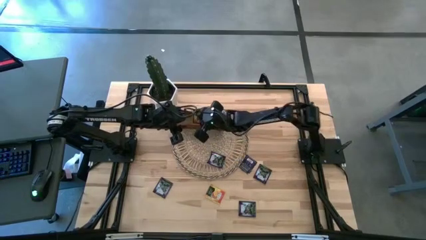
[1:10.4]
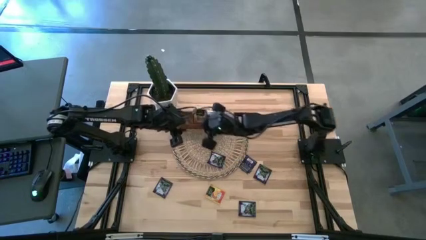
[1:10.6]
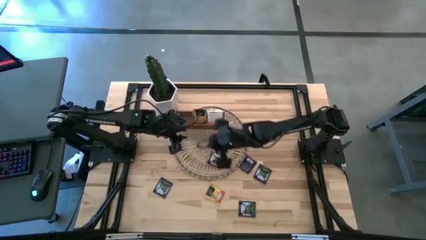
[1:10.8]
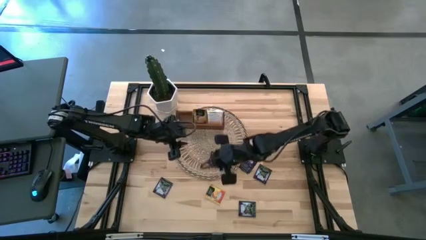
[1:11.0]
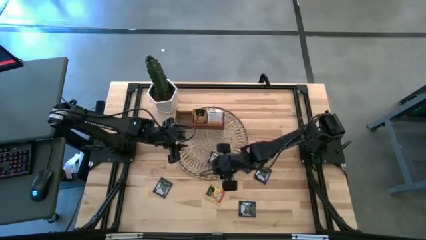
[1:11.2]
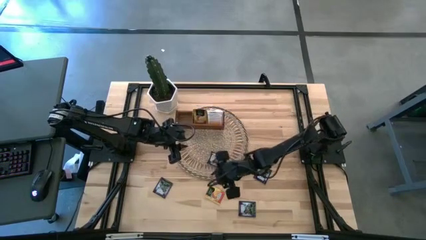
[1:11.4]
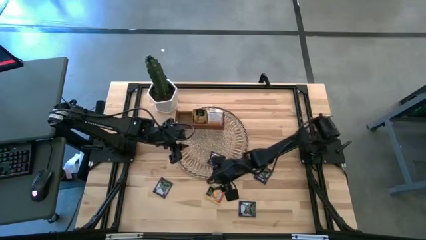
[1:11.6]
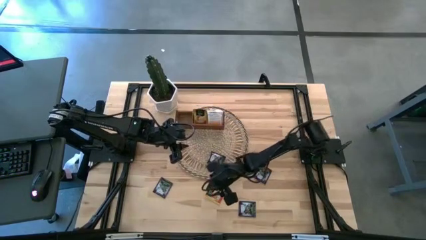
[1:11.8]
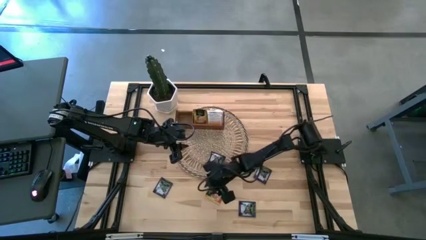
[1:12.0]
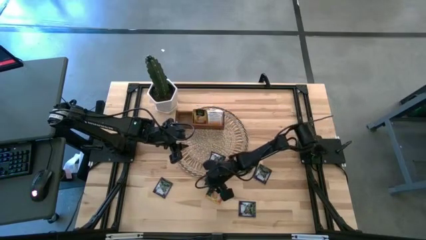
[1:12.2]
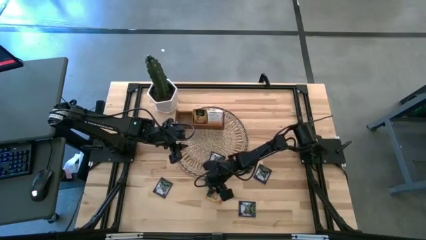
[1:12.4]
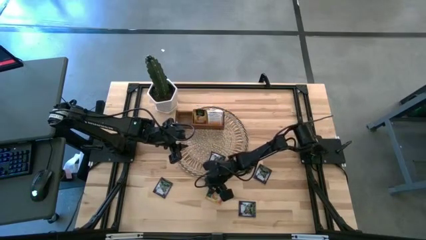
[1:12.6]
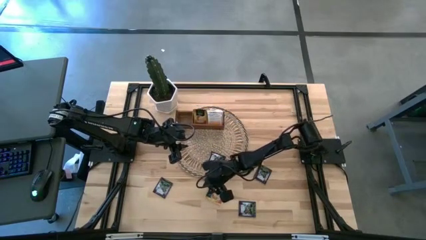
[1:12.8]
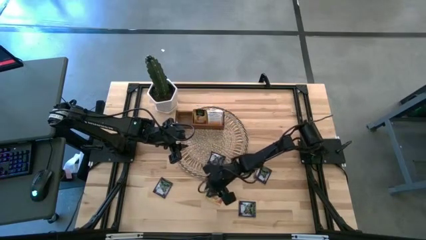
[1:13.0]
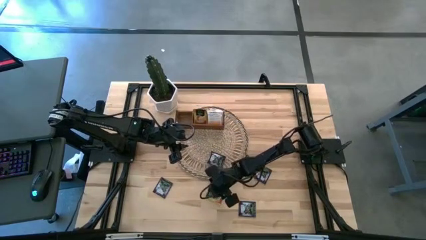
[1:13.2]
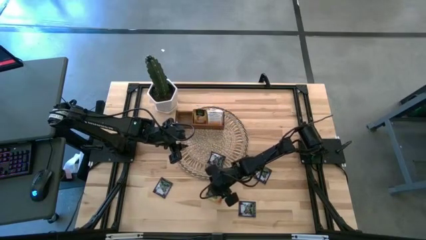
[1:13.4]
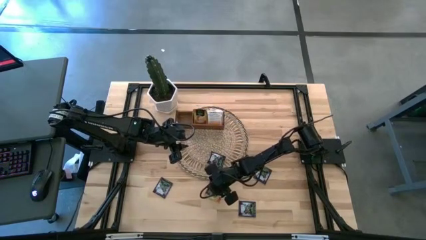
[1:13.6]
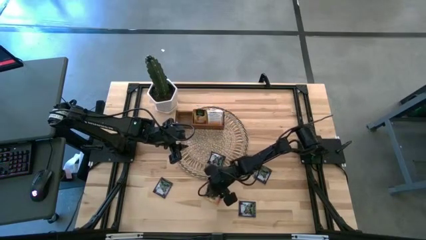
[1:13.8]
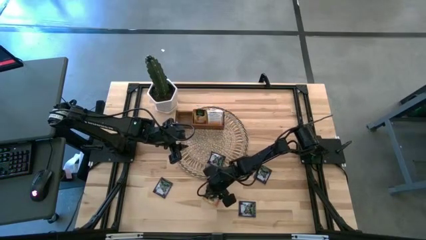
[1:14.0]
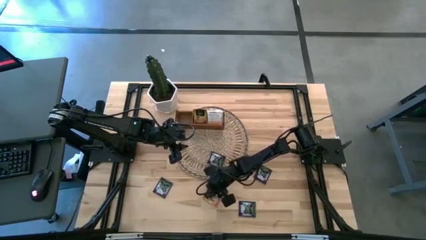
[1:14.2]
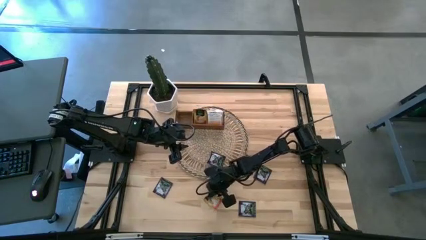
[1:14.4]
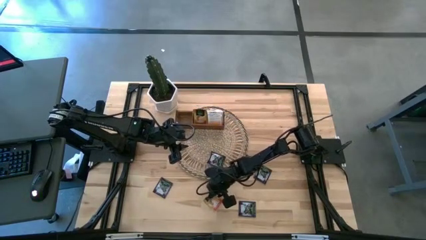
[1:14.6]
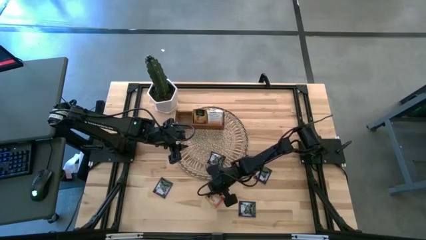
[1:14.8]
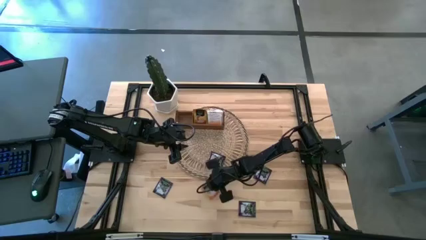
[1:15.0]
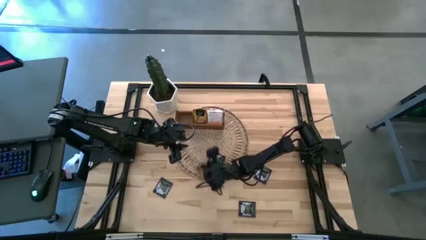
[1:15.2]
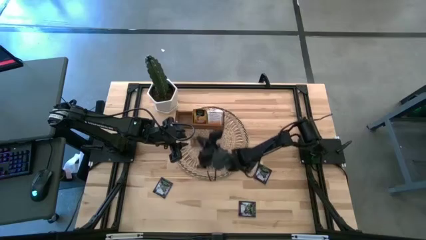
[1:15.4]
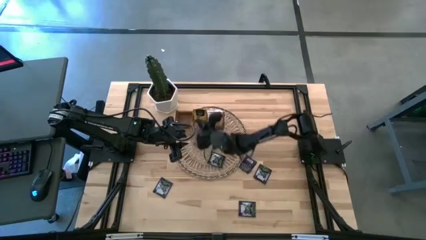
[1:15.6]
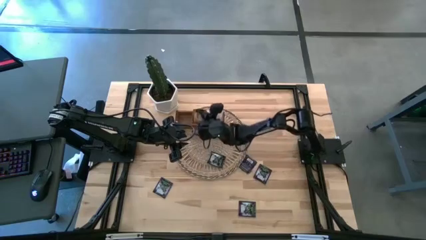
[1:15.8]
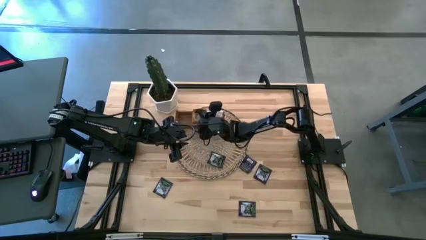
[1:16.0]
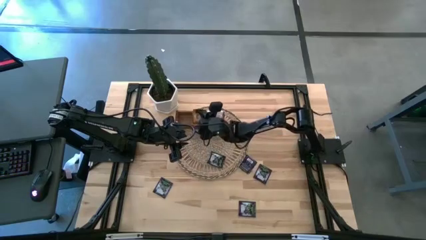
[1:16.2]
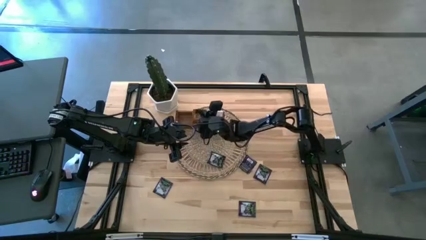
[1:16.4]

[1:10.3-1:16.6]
Task: Pick & Place Tea
Put the orange tea bag into the middle section of the wooden organizer

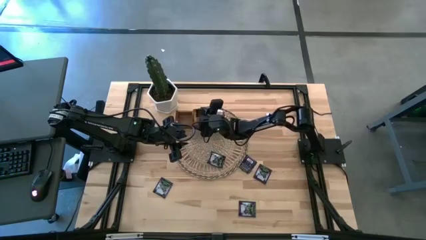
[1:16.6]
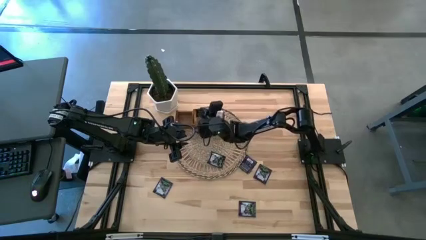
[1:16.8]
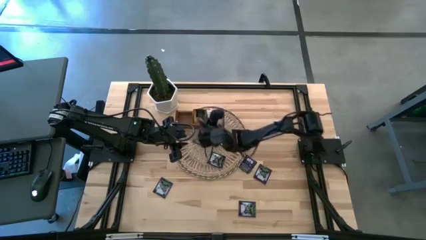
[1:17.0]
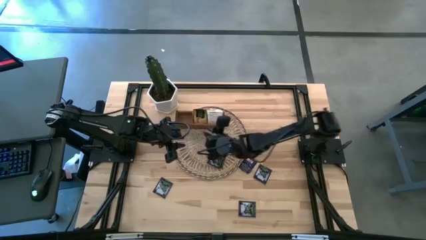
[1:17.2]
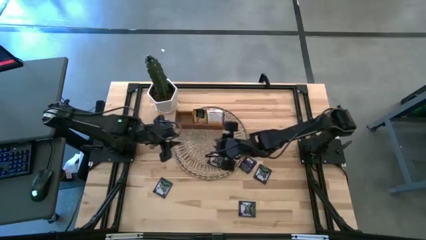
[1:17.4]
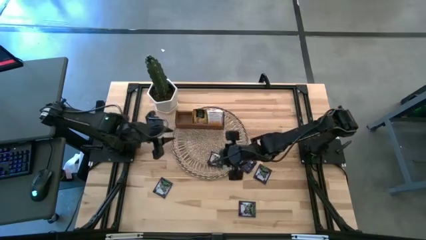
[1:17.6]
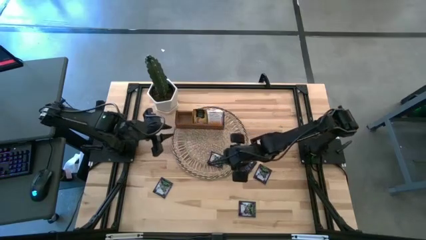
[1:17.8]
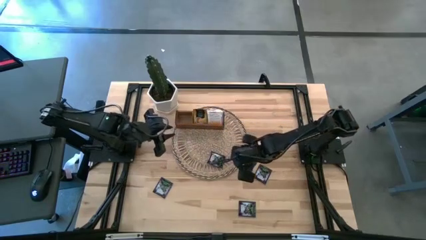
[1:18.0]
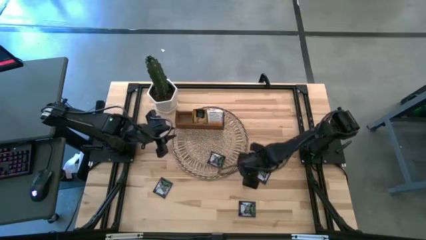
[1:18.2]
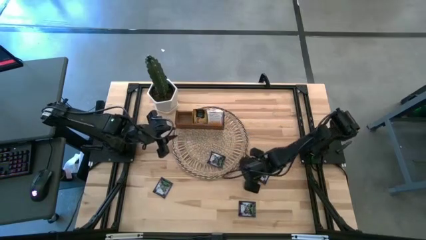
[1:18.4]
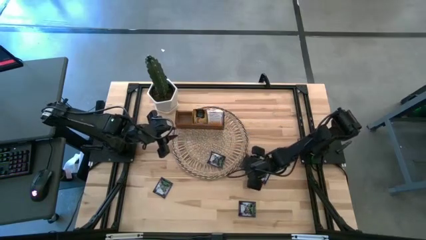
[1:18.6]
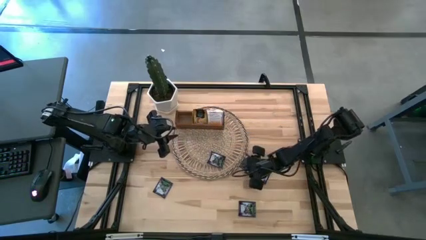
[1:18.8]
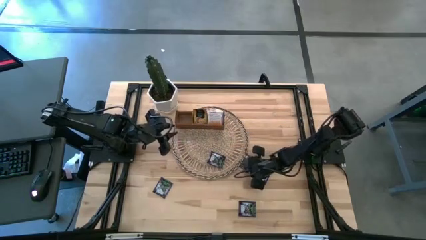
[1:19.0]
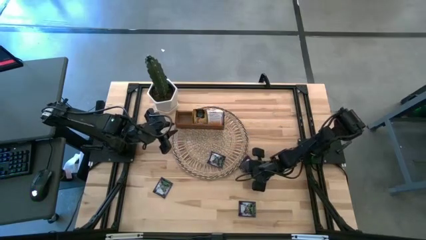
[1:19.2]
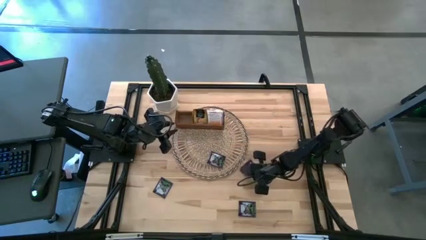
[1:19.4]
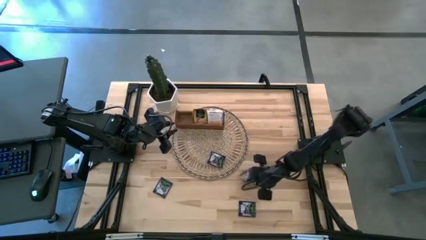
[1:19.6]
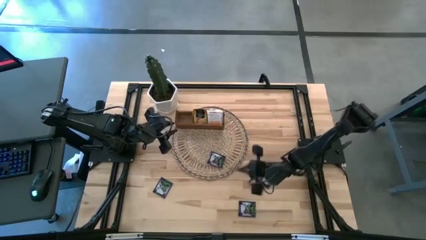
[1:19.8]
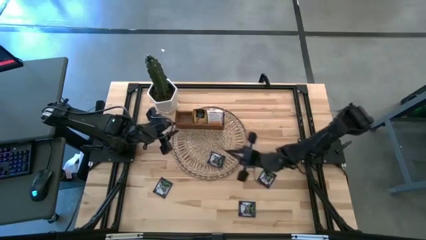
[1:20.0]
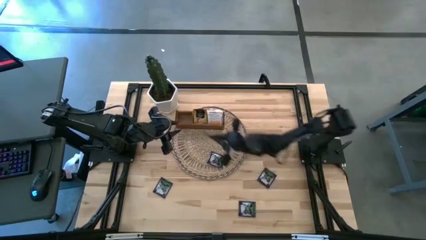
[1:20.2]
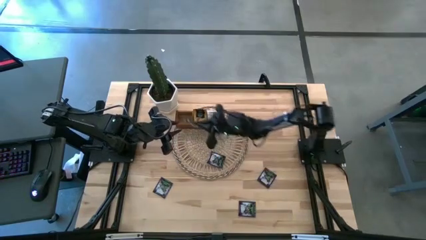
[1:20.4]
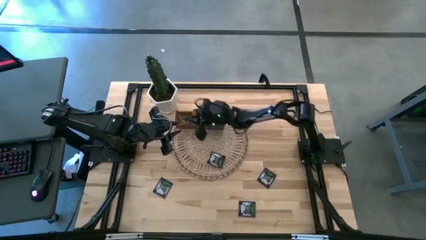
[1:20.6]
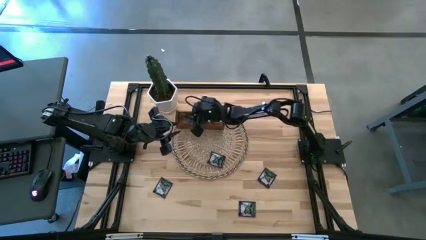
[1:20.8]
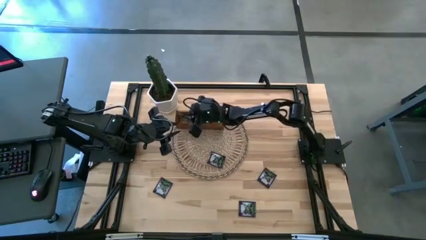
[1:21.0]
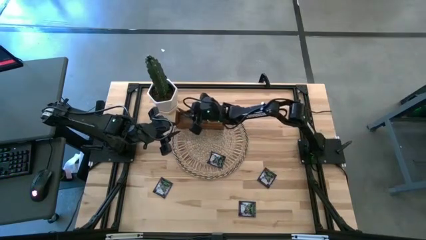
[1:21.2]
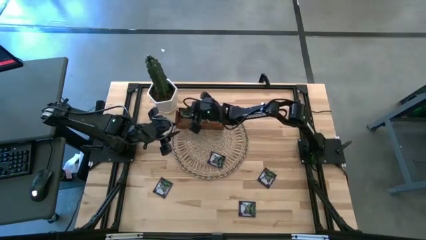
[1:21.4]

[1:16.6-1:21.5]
Put the black tea bag into the left section of the wooden organizer

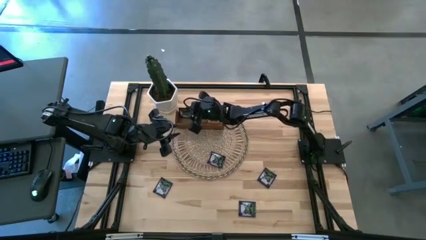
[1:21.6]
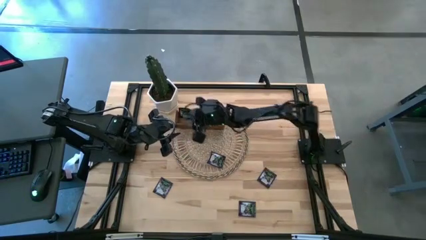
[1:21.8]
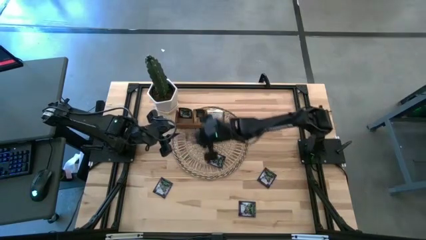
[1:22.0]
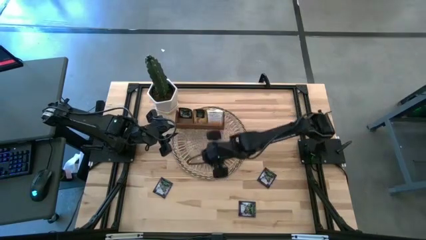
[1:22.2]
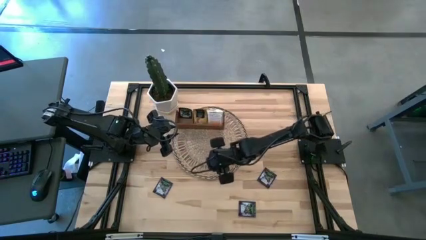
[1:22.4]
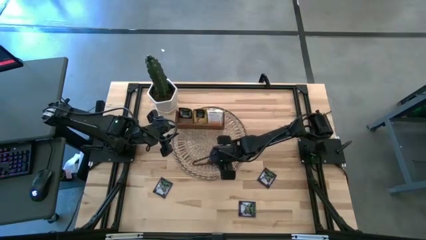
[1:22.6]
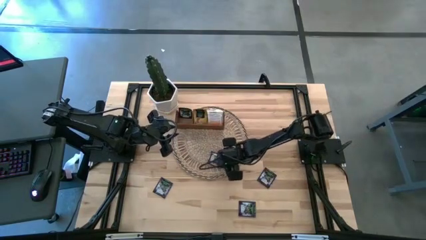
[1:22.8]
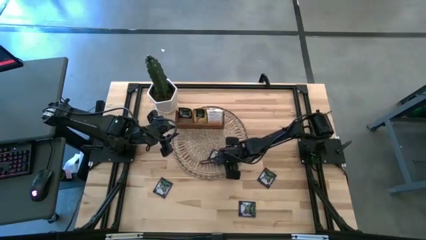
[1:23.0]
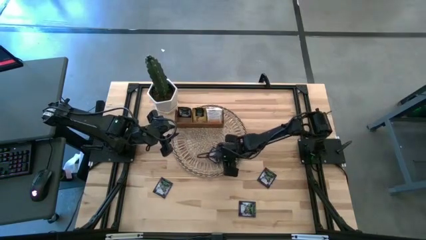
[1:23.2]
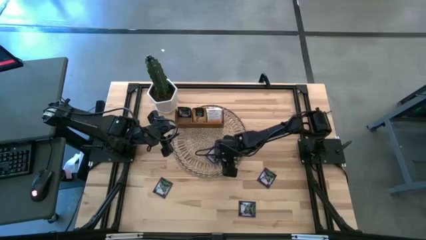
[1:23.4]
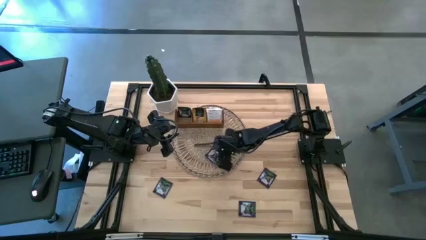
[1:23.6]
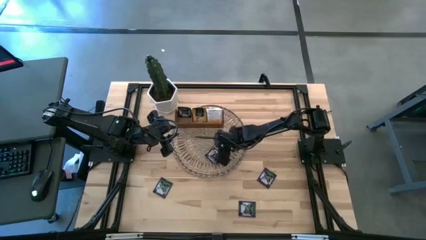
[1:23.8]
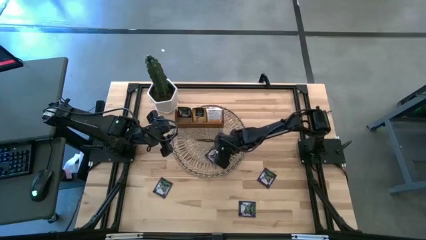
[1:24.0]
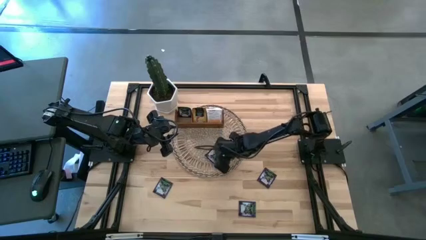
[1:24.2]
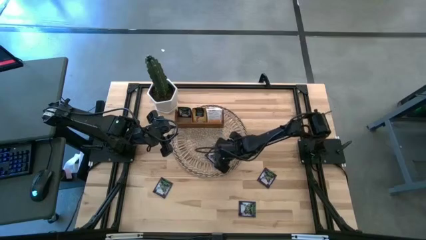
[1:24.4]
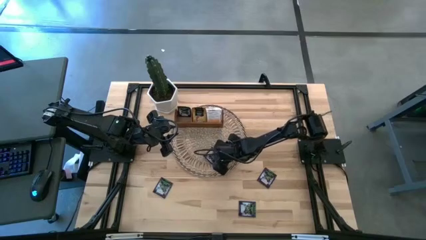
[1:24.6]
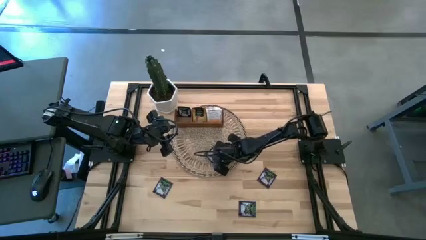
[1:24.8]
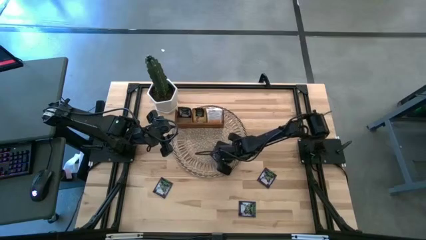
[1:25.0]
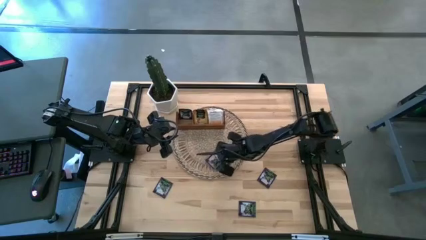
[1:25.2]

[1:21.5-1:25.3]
Put the black tea bag into the left section of the wooden organizer

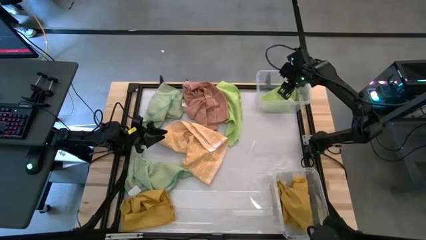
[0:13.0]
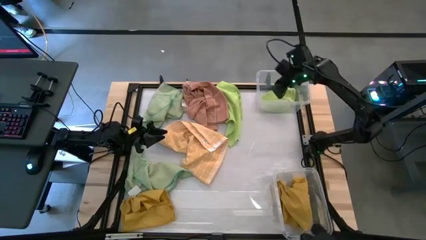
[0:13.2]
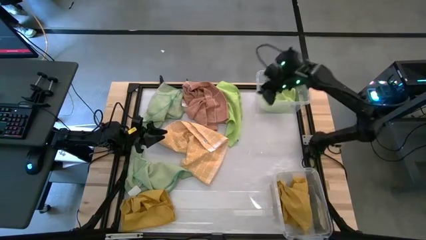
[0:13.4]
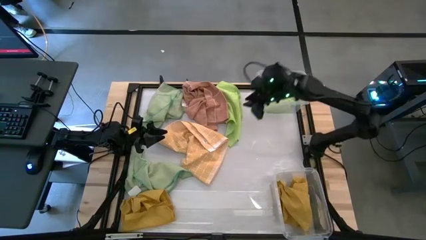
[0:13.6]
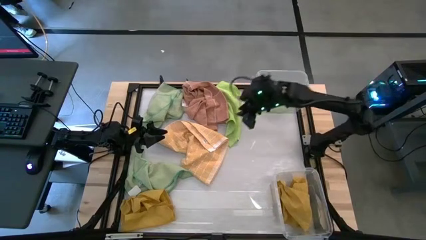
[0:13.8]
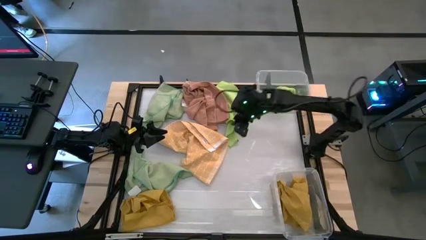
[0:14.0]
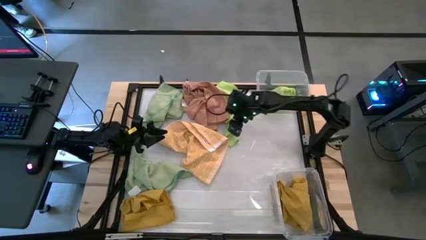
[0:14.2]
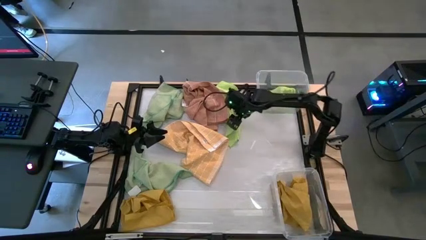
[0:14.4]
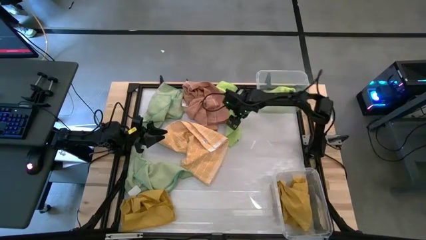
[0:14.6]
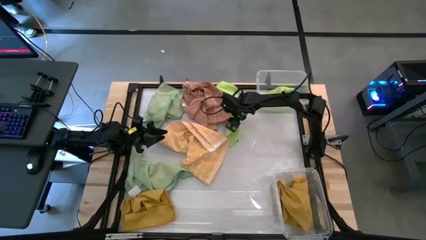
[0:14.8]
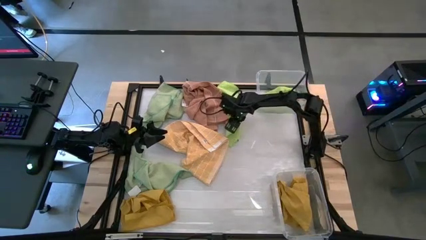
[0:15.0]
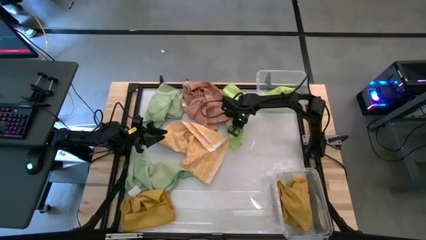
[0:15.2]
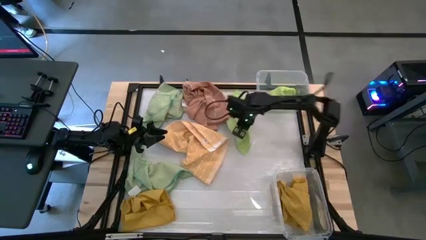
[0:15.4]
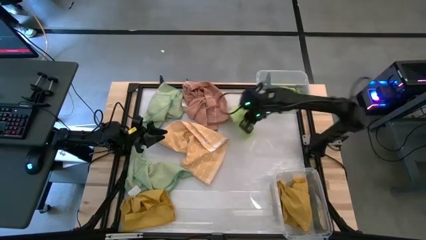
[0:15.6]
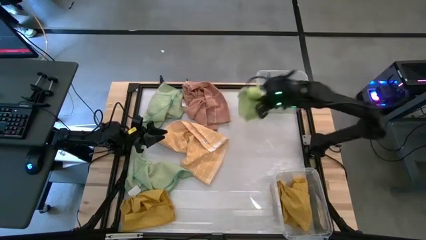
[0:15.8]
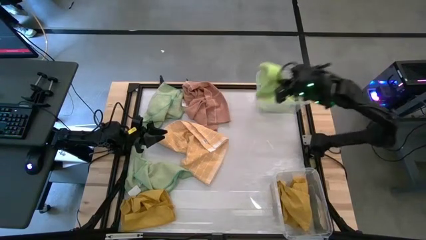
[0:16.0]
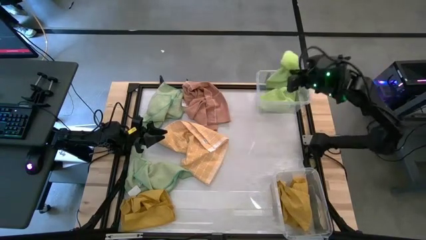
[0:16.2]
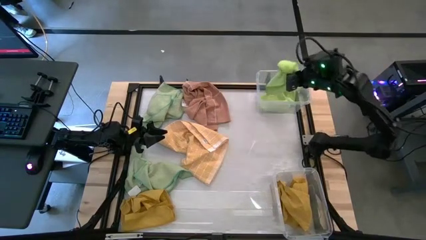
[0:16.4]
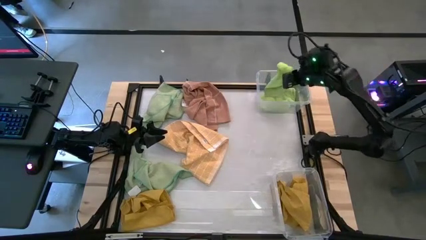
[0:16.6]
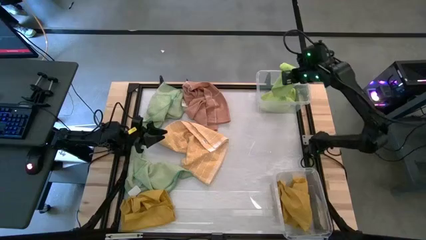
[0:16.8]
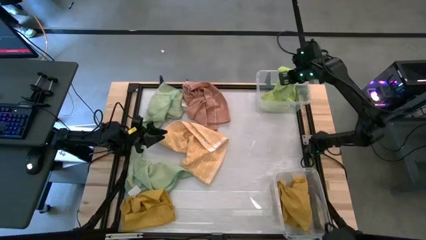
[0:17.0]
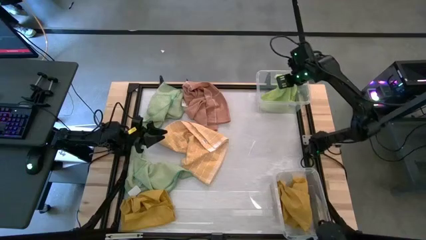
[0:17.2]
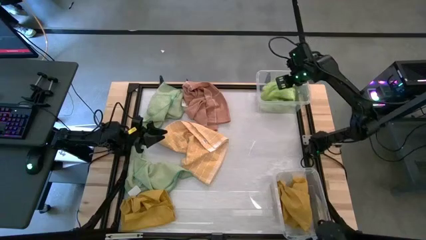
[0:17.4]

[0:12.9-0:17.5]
Task: Sort towels by color in basket
Put the green towel into the top transparent bin
